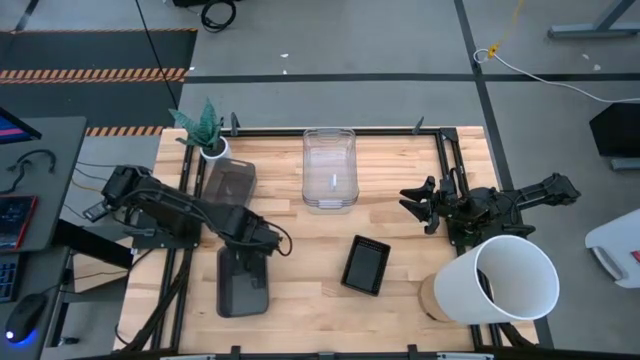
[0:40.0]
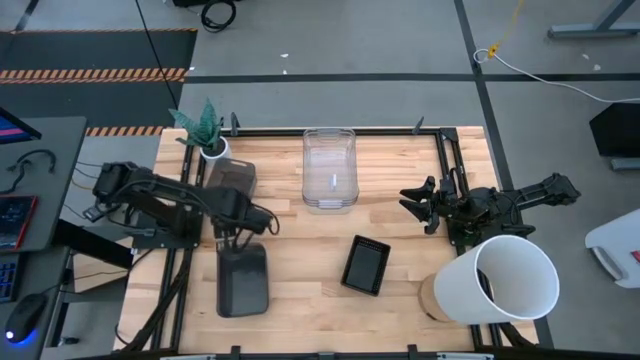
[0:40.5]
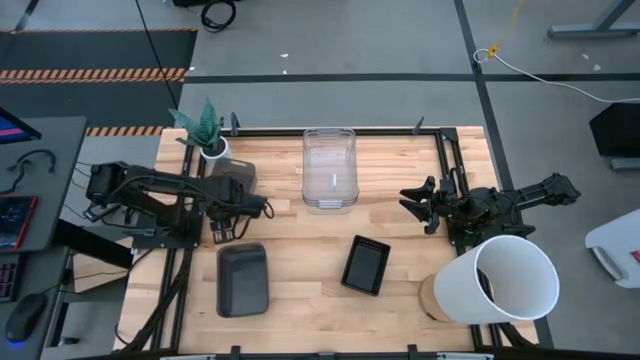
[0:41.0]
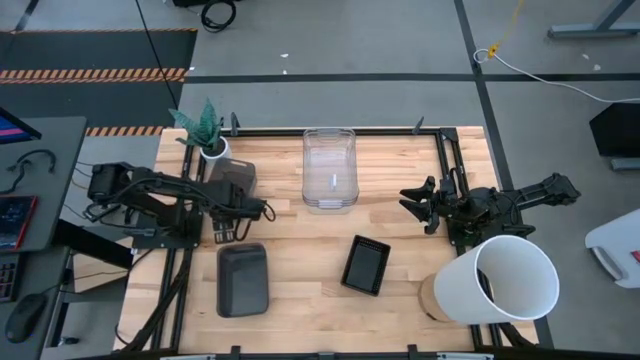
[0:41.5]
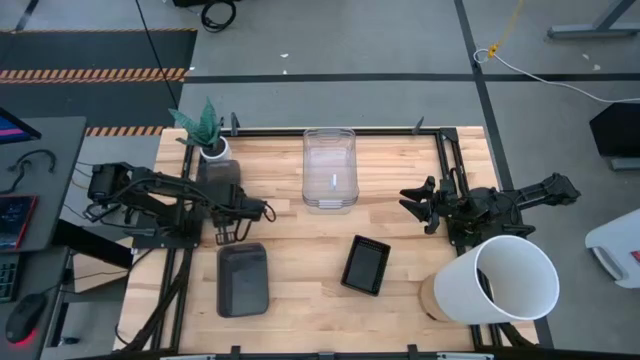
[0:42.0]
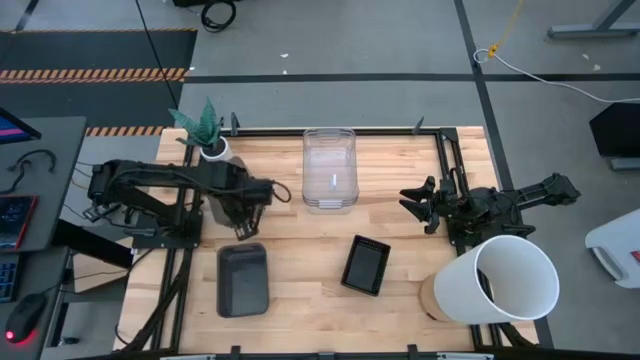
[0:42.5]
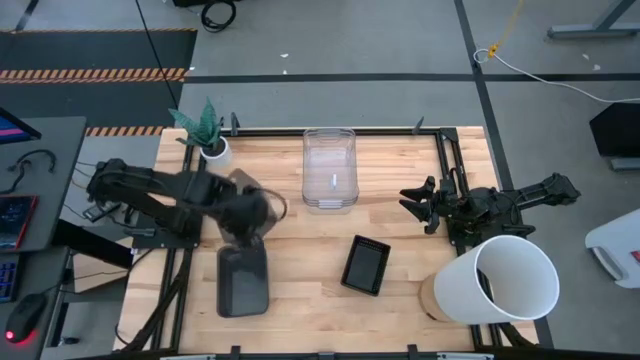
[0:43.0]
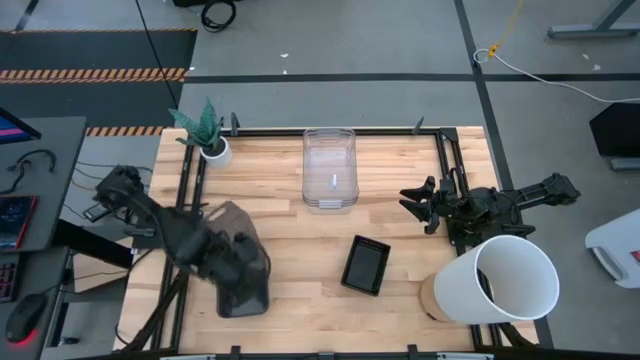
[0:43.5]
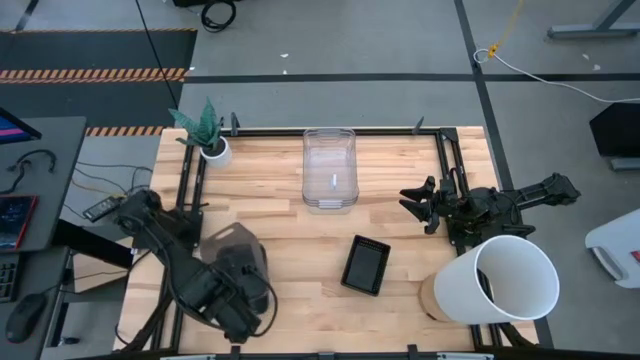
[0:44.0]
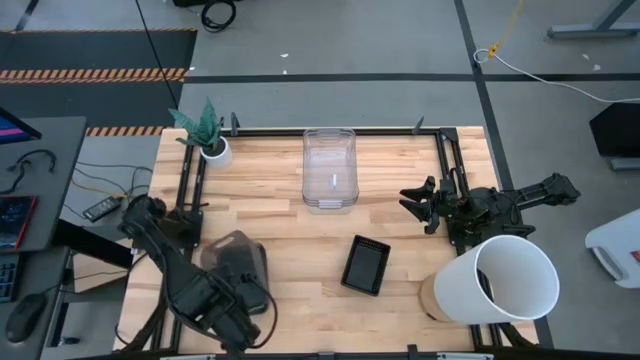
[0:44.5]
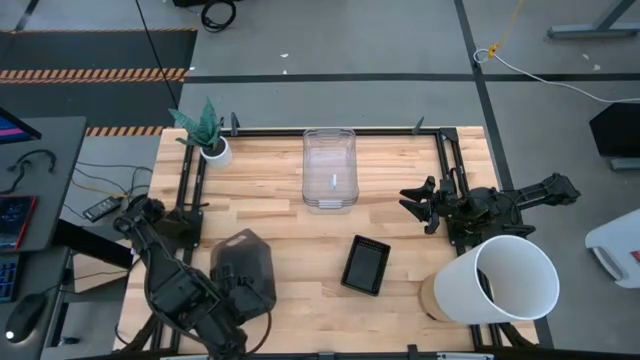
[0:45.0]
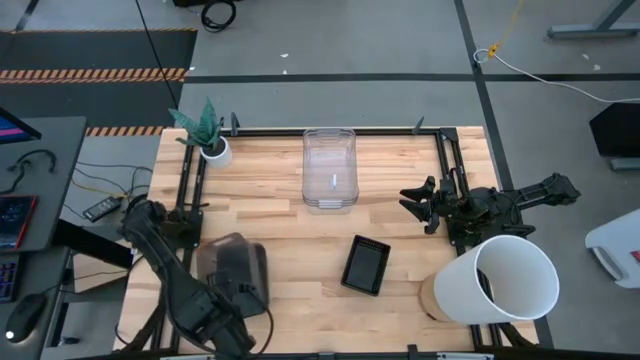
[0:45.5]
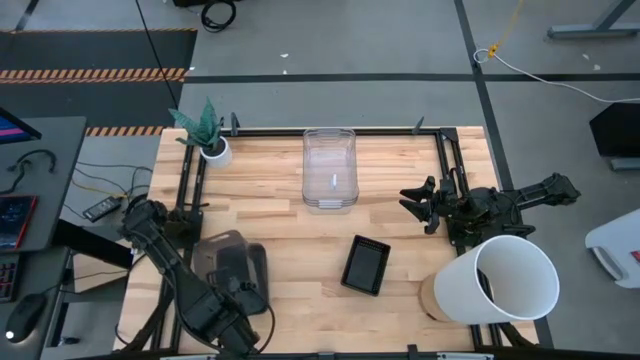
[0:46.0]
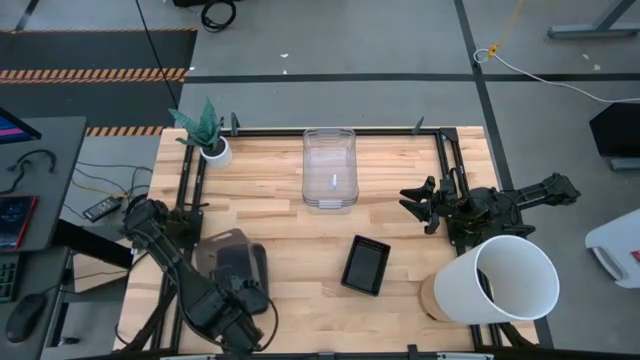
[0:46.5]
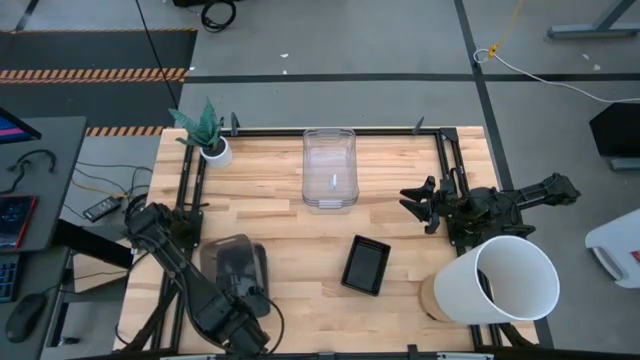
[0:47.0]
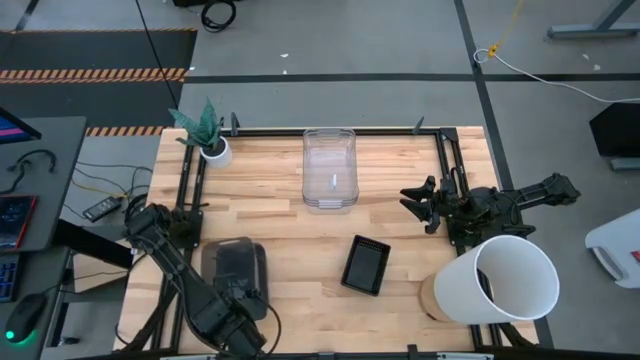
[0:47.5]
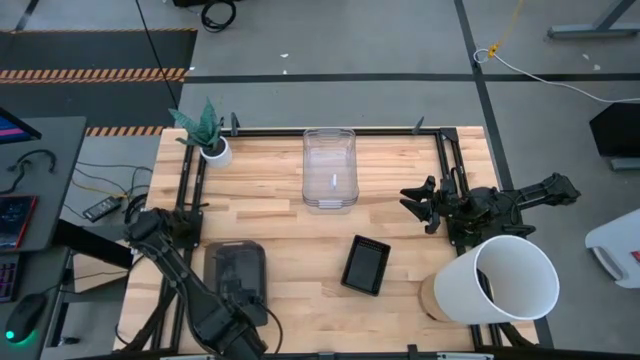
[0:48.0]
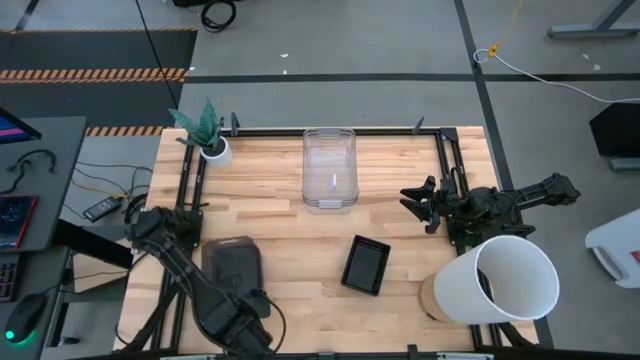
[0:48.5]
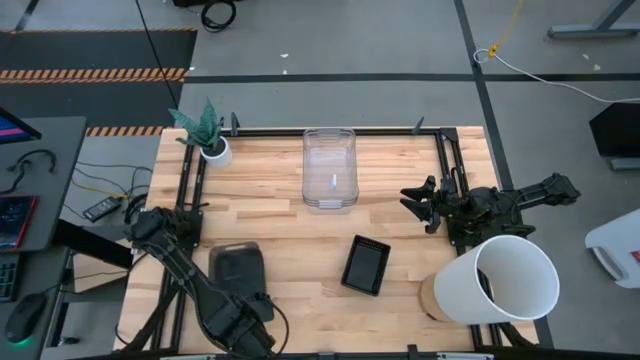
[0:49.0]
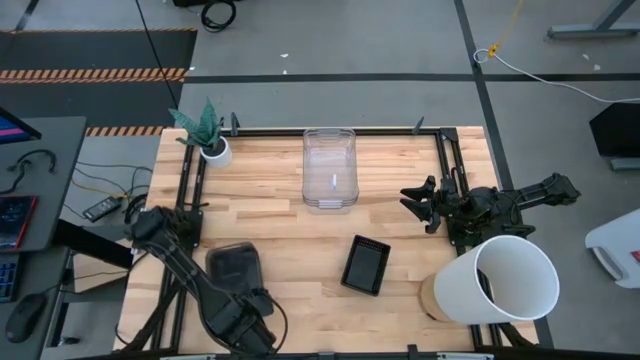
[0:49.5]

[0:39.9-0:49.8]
Stack the top transparent black bin on the bottom transparent black bin

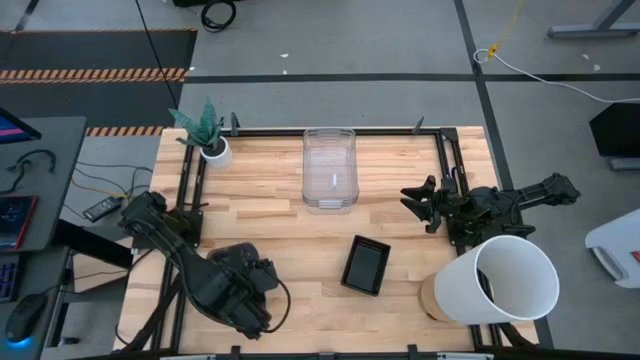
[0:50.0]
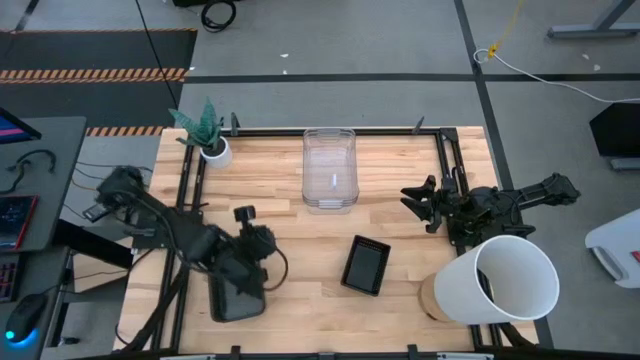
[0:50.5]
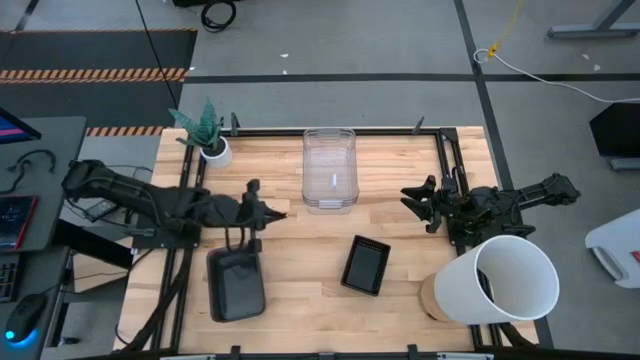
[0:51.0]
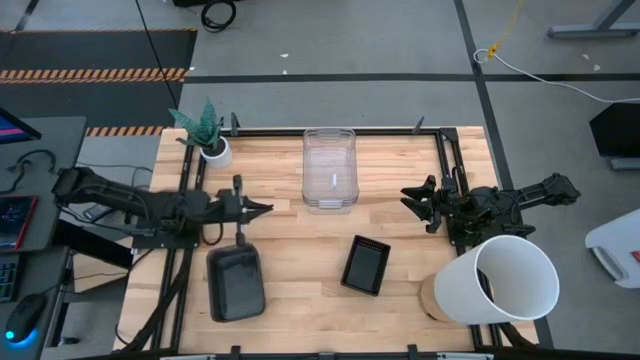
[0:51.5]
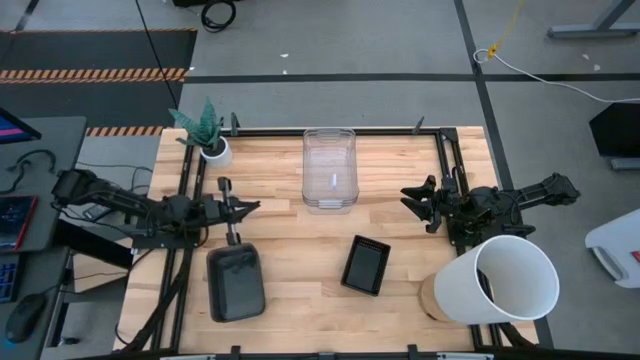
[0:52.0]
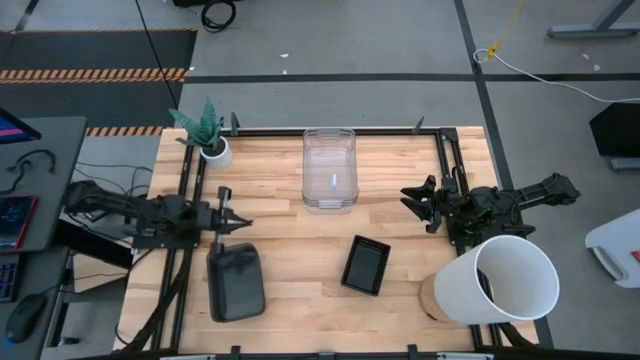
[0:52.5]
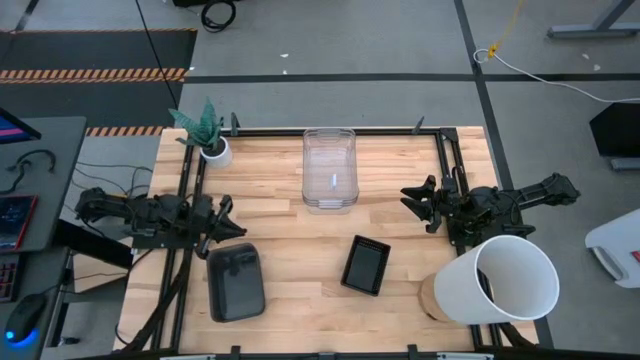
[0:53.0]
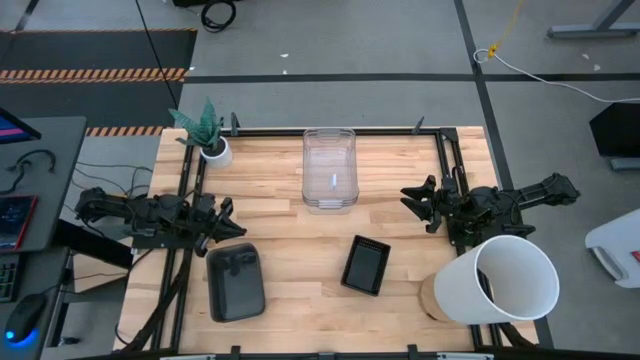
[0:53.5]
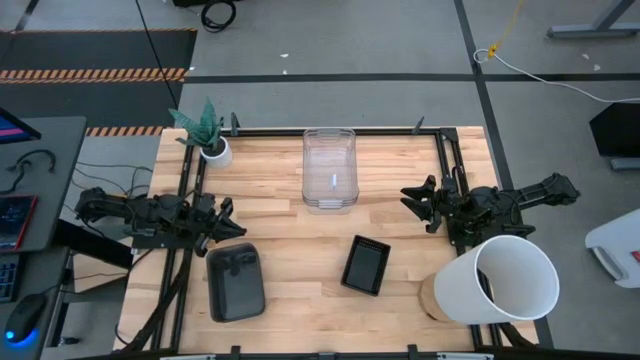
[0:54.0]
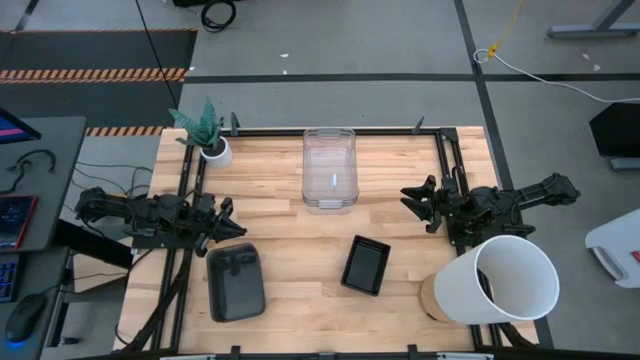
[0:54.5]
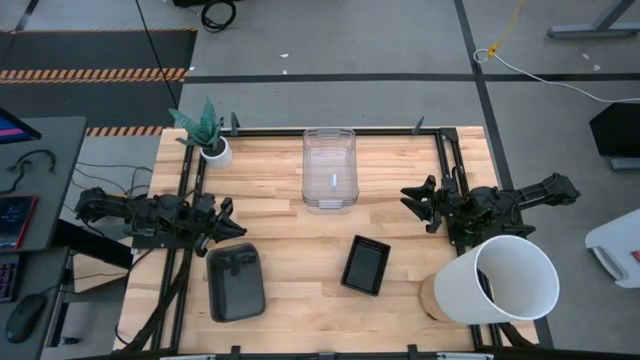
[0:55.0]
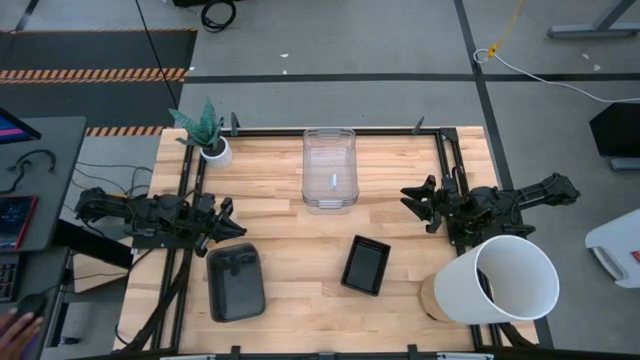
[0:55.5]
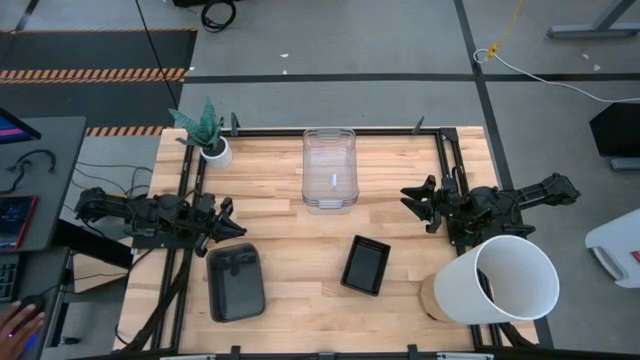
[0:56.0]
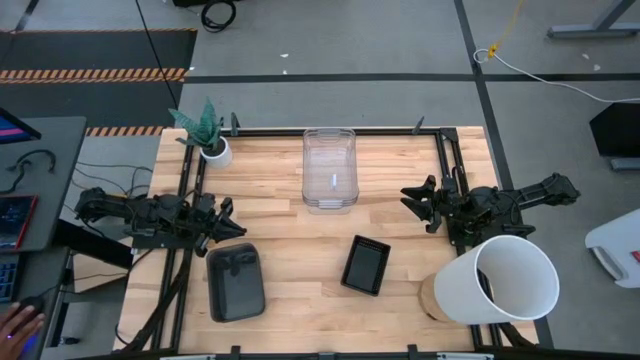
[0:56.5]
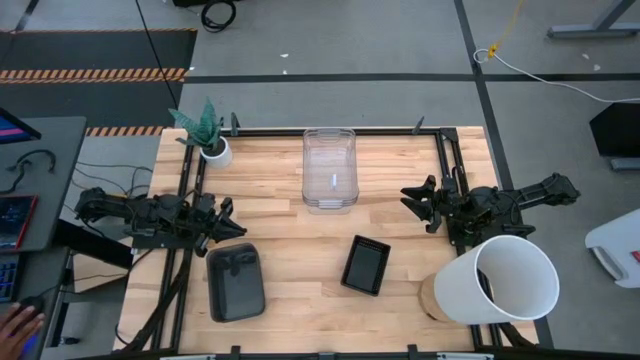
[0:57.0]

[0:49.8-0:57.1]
Return to Home Position
